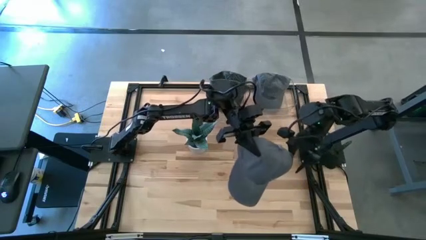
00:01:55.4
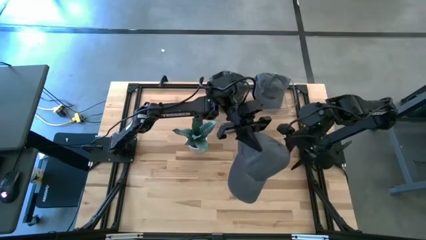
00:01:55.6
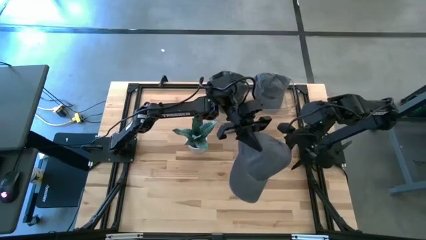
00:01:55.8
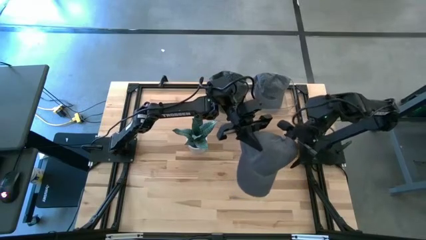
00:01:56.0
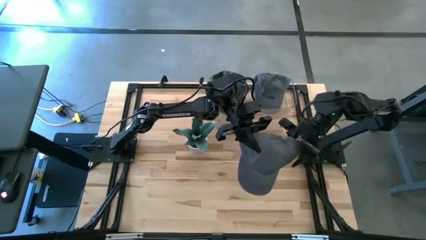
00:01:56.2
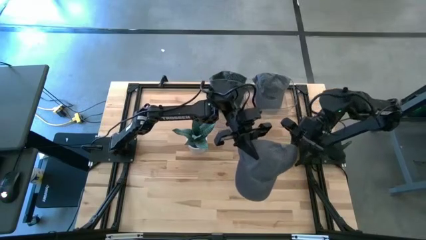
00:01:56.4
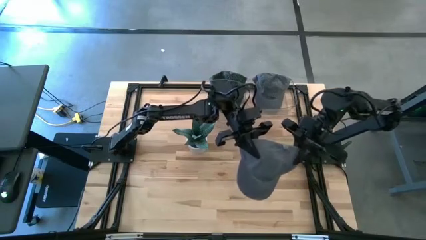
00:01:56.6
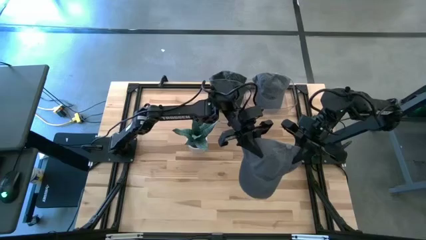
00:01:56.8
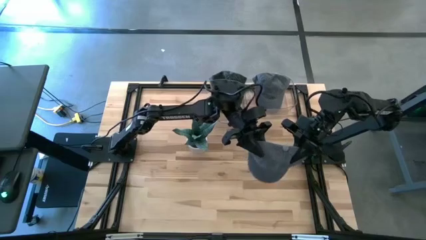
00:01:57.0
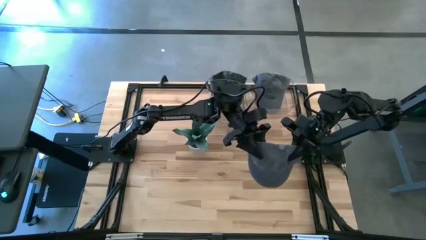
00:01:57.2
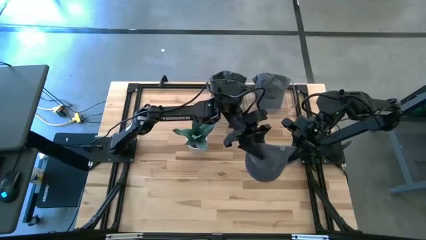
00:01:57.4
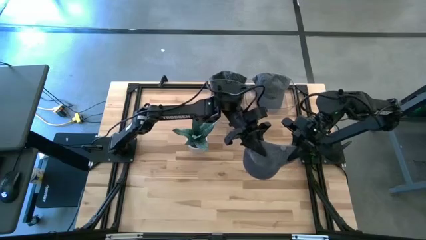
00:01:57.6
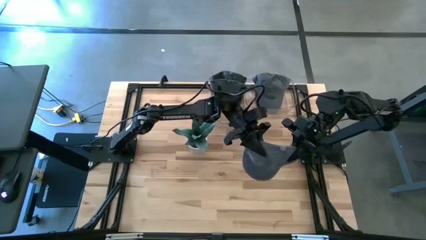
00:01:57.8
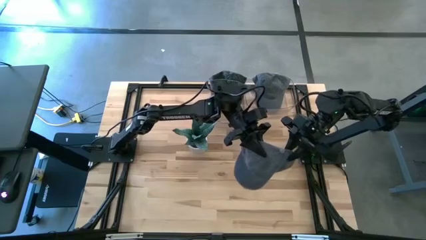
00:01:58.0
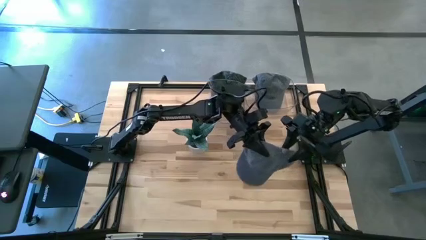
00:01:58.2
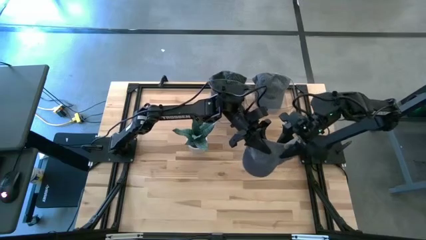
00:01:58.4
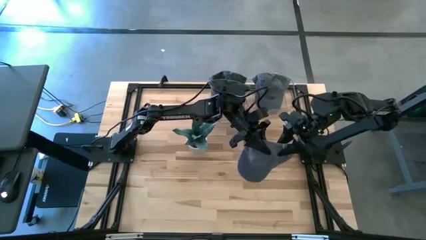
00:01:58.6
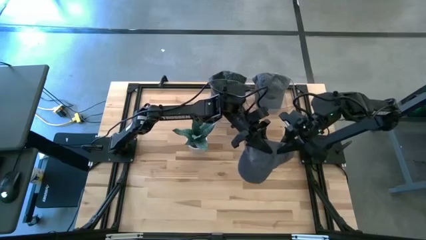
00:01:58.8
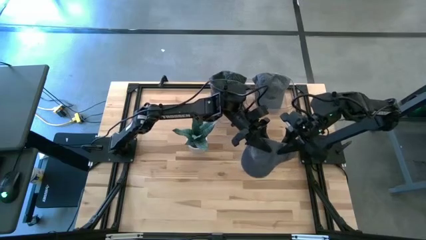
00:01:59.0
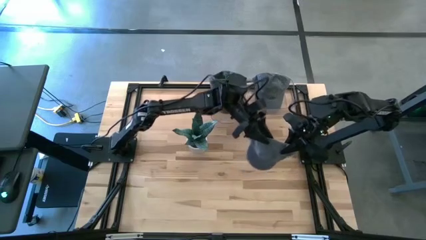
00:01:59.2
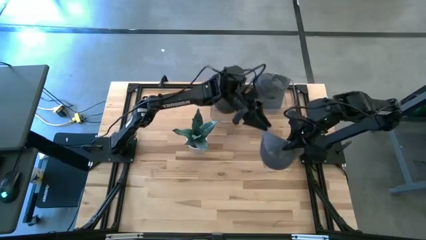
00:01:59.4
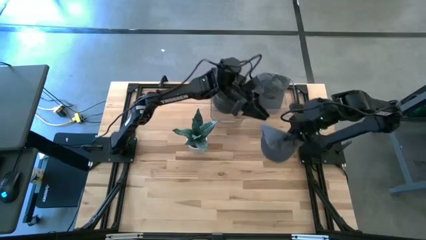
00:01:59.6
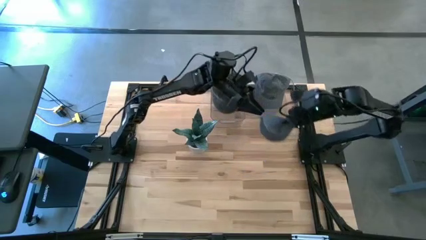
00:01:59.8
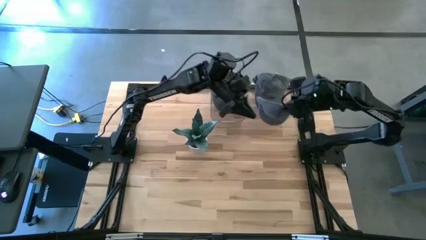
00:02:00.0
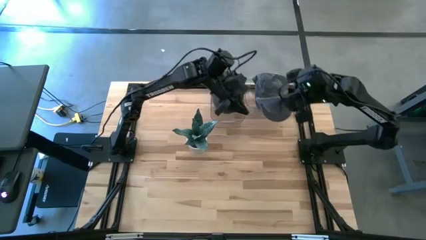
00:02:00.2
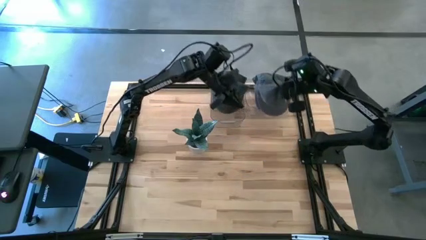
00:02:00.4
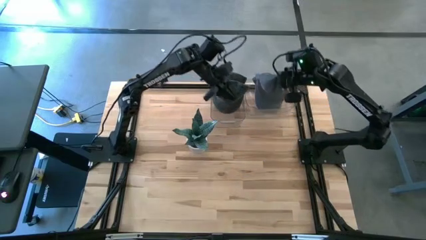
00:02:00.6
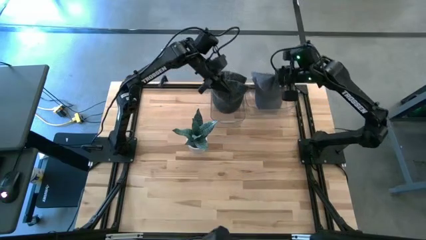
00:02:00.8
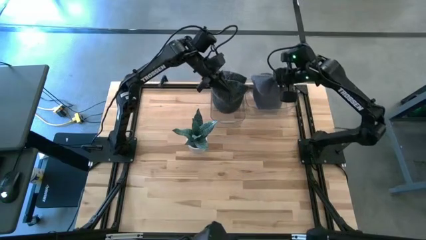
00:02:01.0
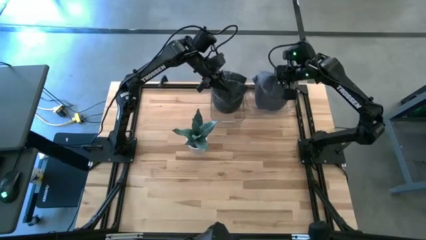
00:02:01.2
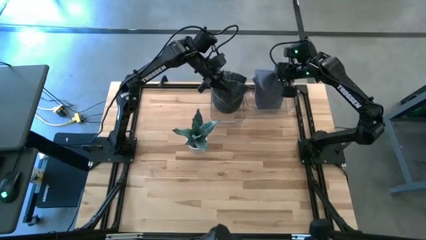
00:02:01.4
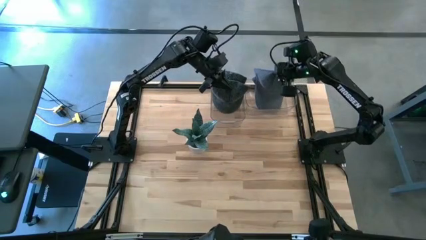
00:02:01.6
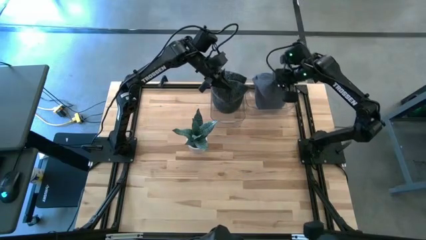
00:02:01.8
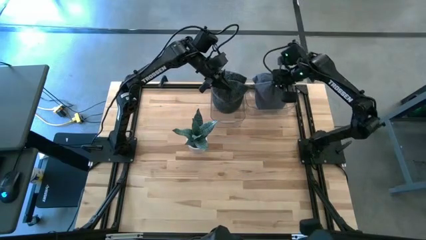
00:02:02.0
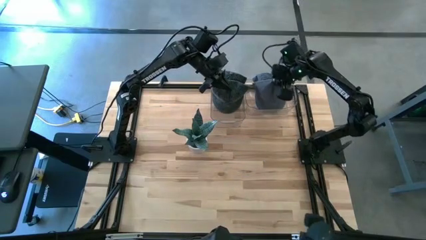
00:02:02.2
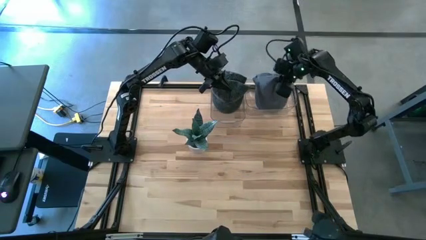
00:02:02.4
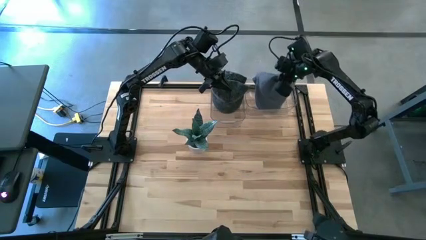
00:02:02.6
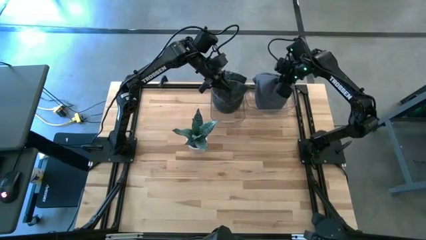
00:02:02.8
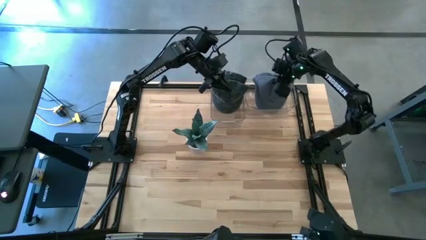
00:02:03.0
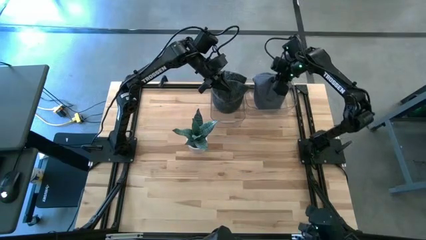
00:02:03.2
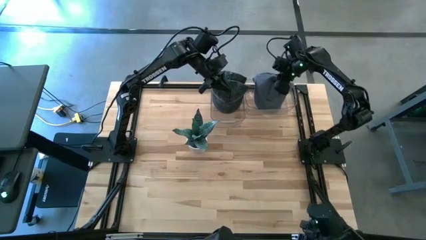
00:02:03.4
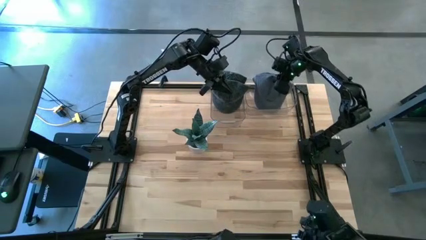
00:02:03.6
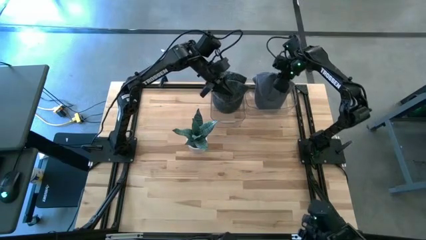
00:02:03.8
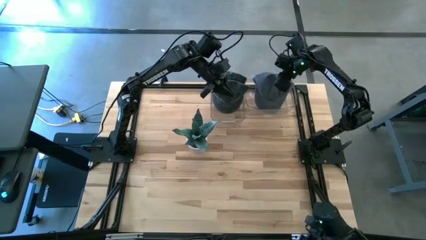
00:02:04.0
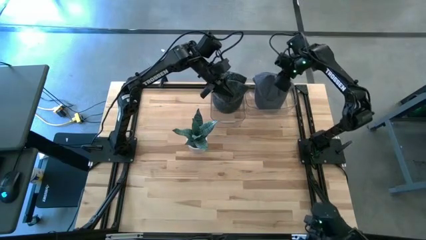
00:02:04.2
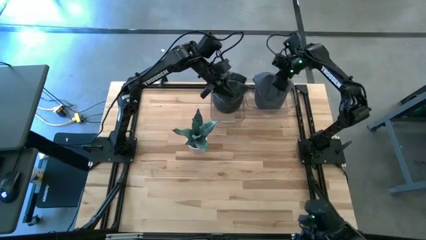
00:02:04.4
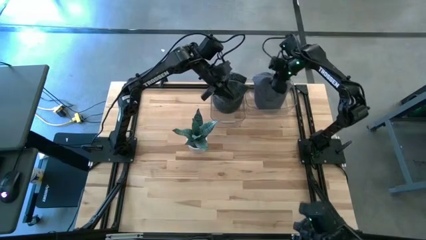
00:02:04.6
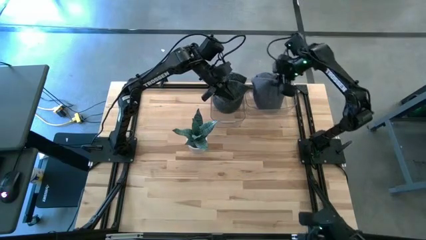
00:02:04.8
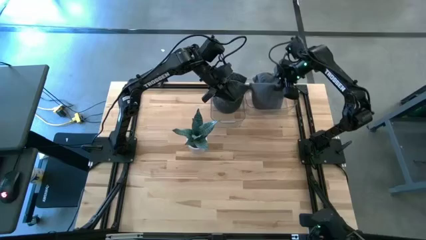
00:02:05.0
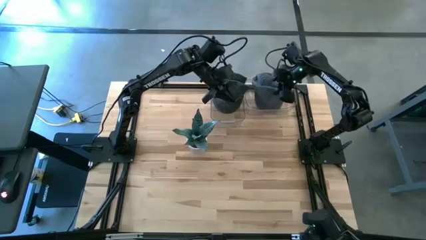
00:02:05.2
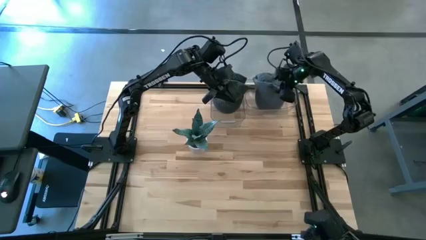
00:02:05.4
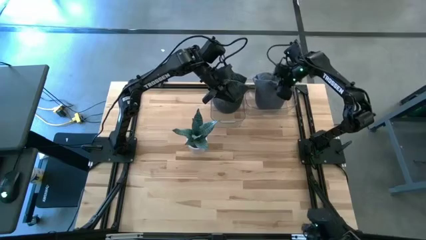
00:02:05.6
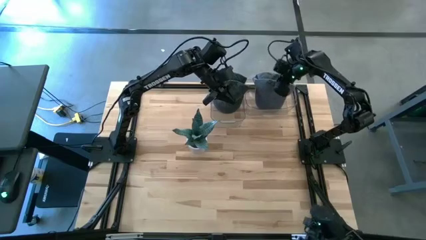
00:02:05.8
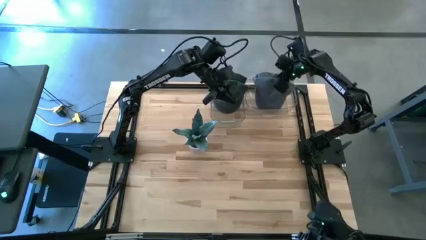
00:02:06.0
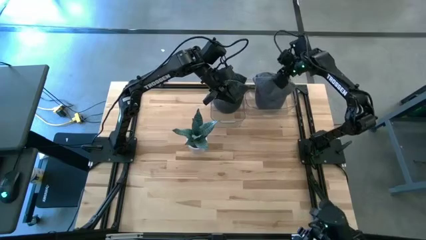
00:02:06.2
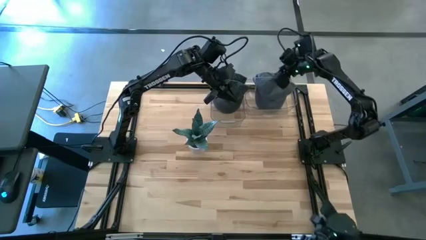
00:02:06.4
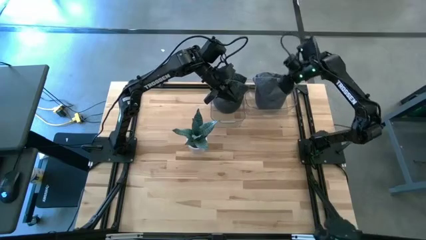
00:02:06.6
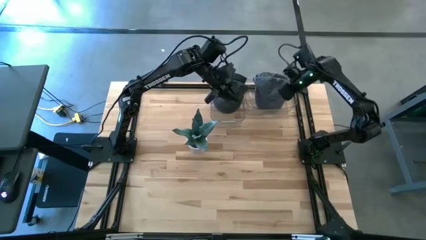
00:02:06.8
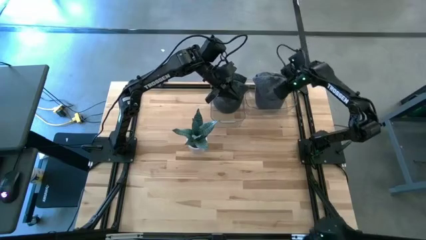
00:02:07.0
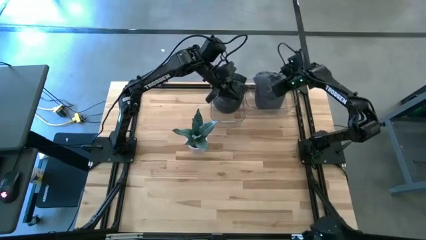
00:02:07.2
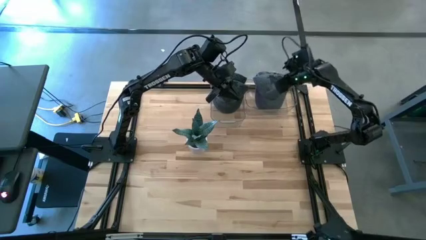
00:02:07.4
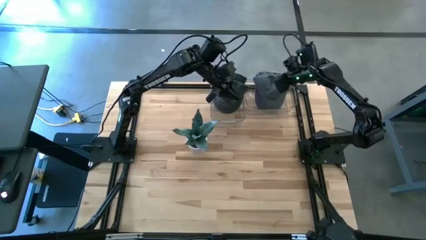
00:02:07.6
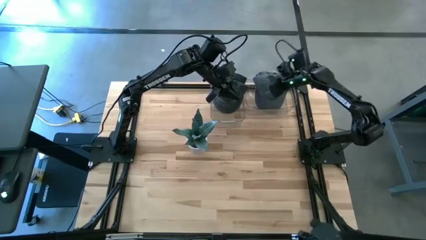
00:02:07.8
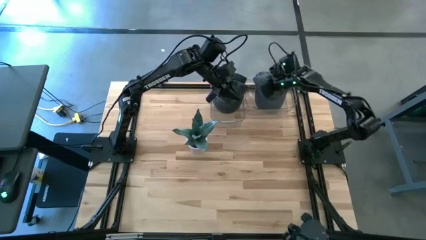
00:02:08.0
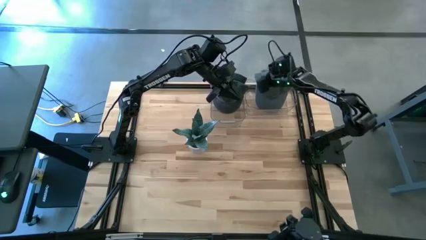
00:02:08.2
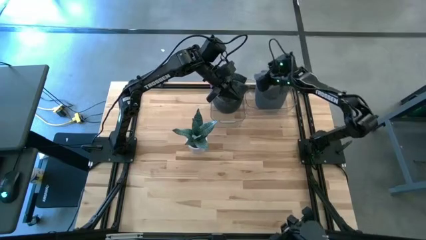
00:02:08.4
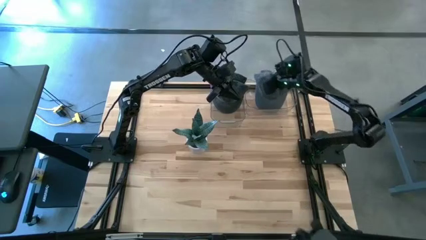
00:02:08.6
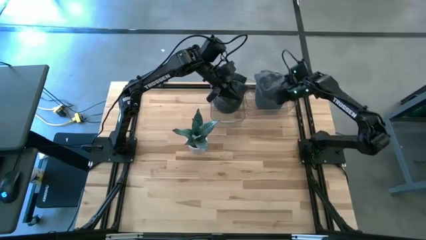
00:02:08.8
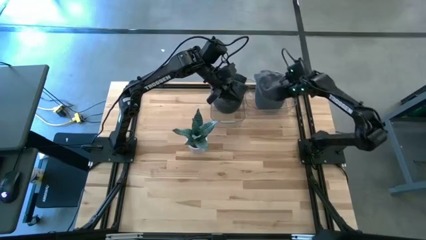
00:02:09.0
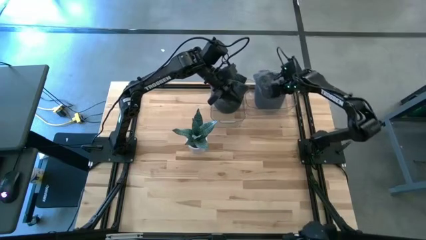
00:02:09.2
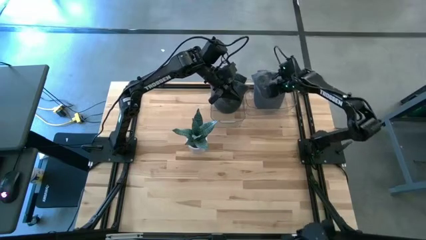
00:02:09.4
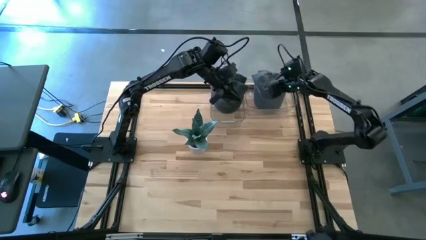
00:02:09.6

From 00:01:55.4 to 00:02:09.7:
Task: Pick & Place hat
Put the gray cap into the right transparent bin

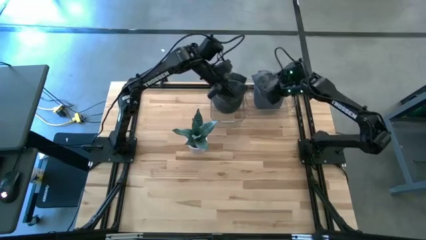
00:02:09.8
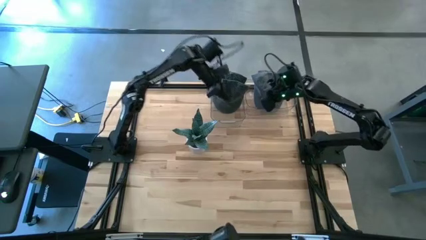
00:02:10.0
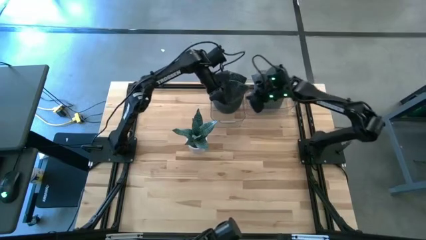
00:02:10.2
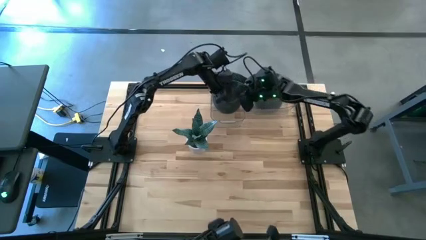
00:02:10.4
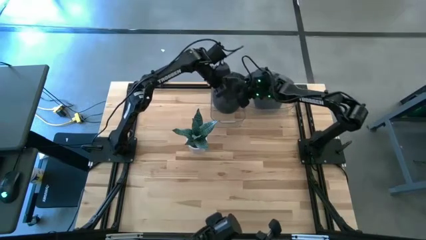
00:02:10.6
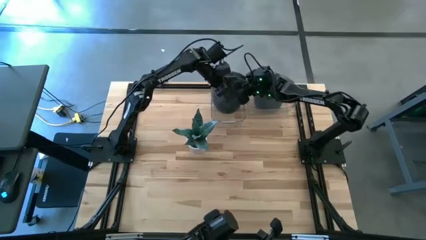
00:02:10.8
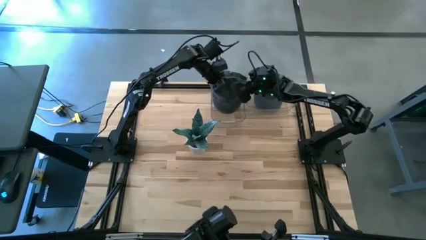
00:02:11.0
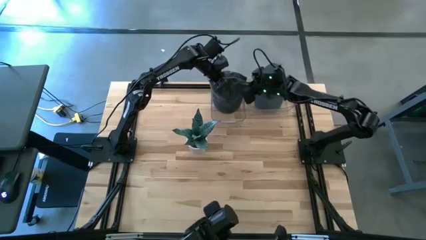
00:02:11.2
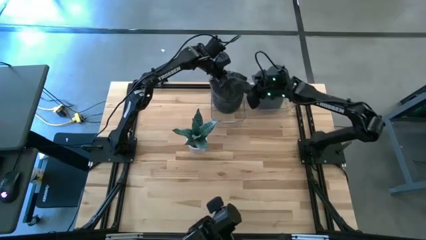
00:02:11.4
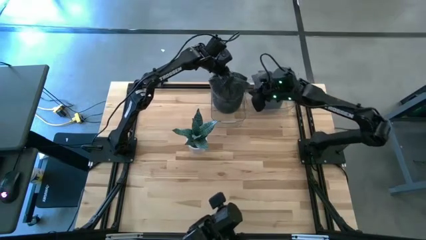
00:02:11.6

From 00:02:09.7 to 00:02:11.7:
Adjust the green cap in the left transparent bin
